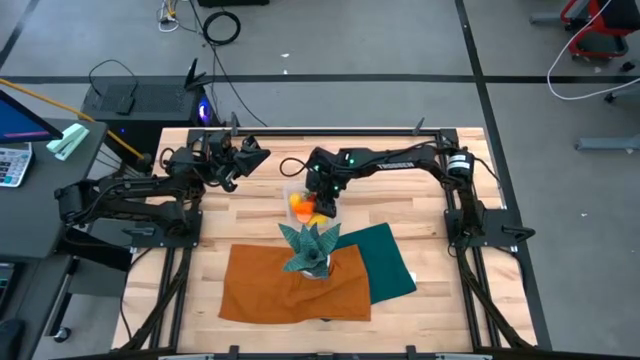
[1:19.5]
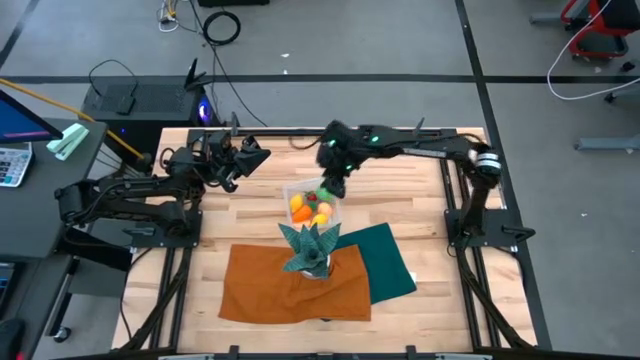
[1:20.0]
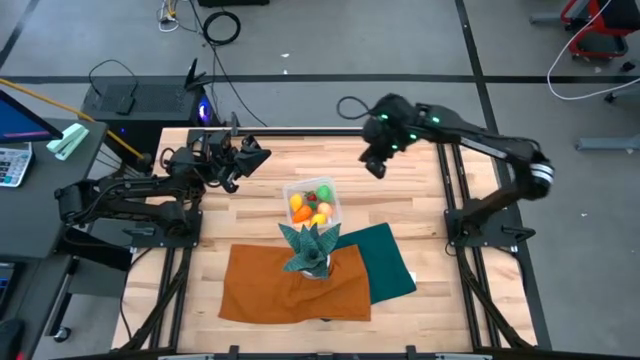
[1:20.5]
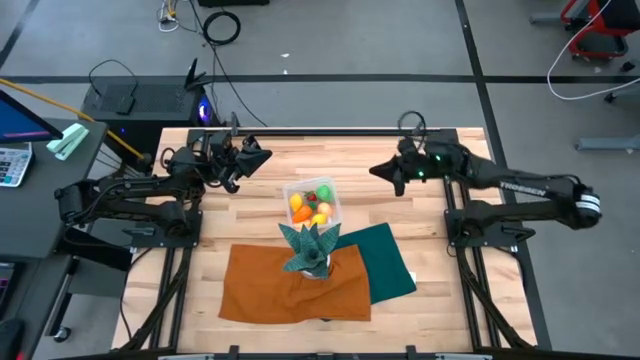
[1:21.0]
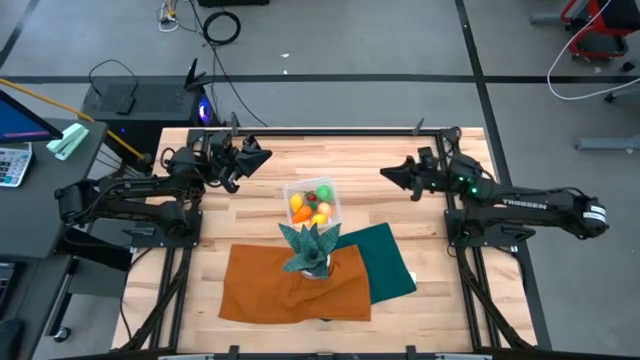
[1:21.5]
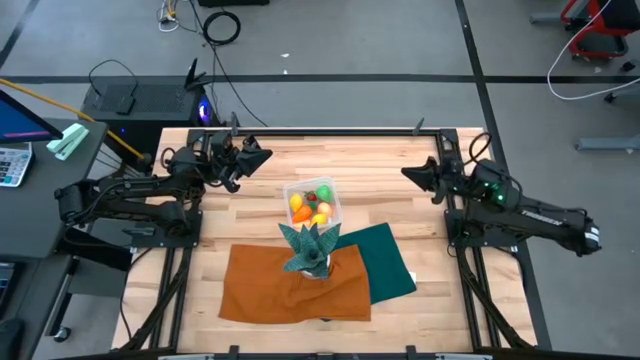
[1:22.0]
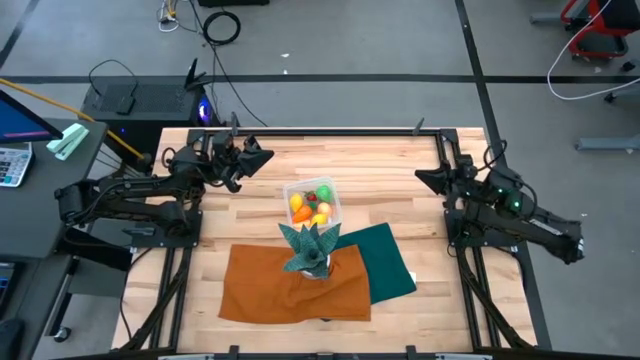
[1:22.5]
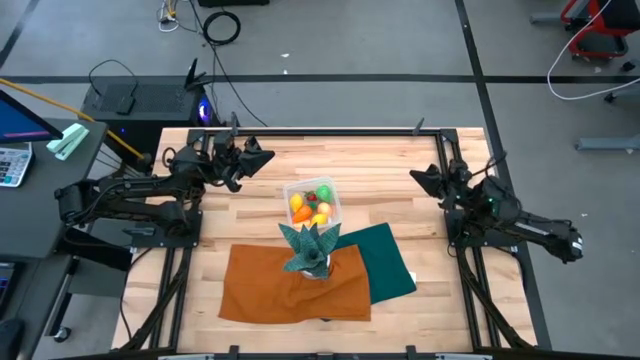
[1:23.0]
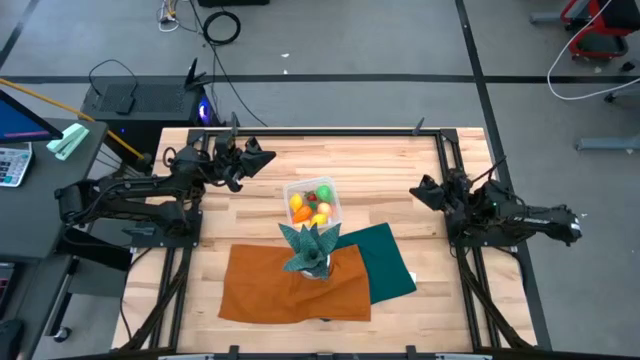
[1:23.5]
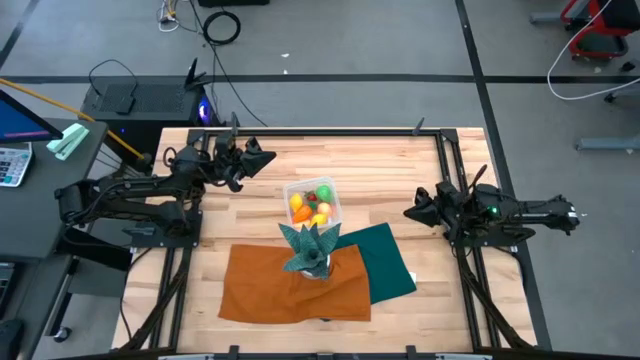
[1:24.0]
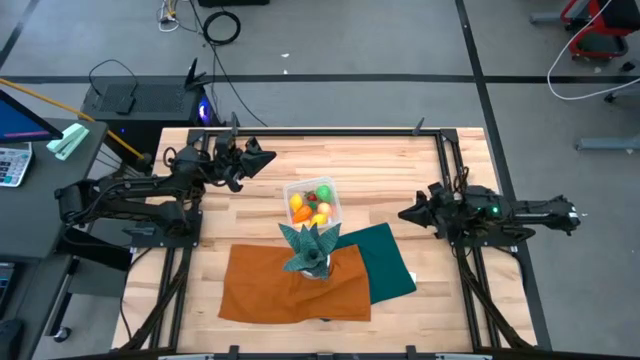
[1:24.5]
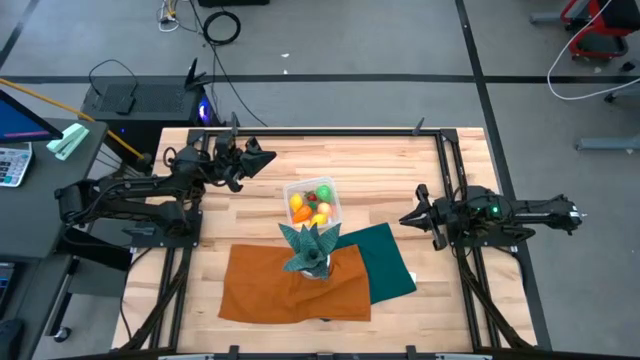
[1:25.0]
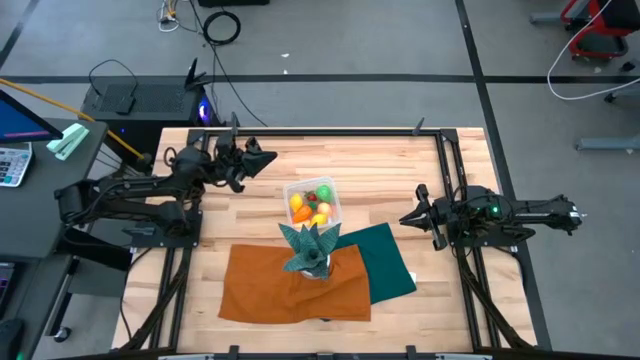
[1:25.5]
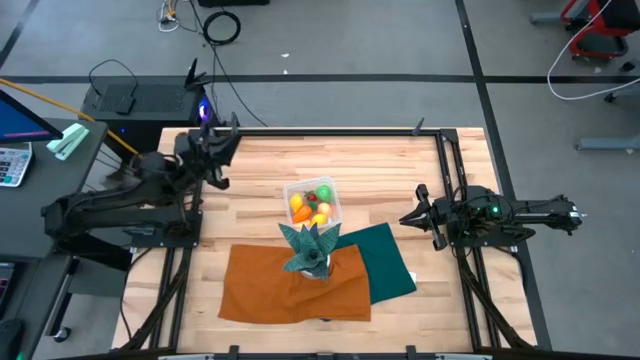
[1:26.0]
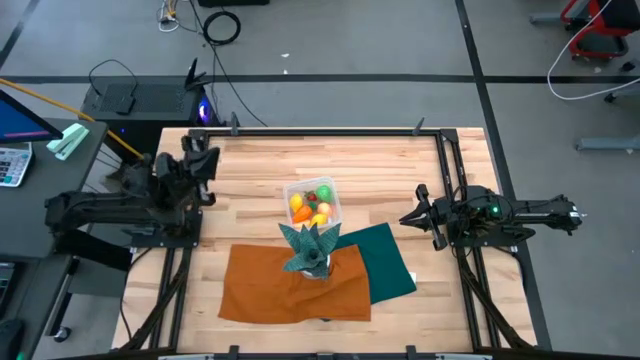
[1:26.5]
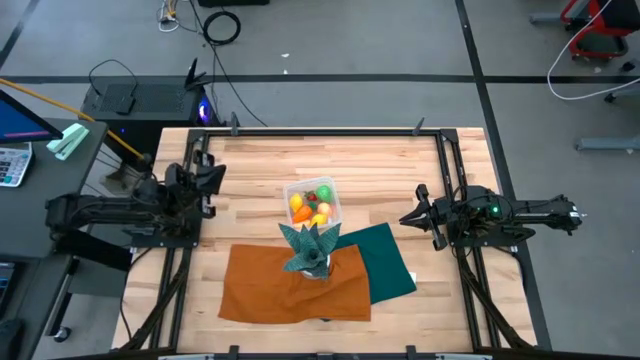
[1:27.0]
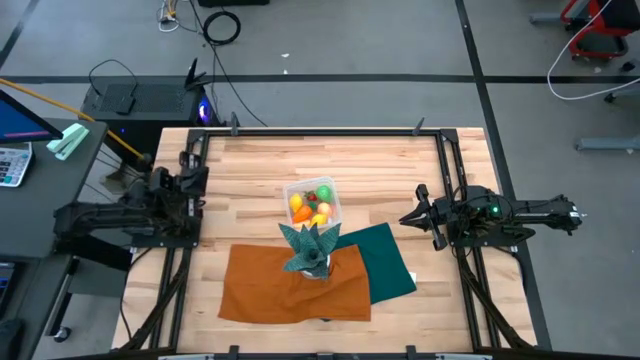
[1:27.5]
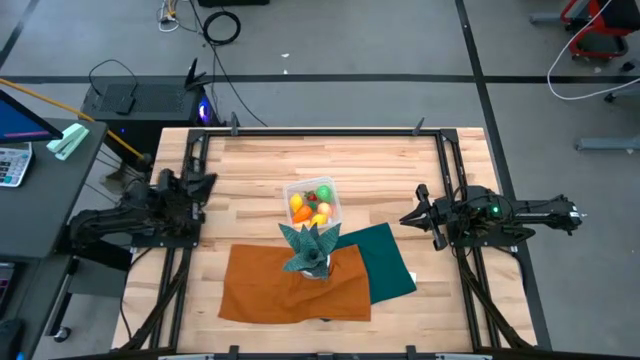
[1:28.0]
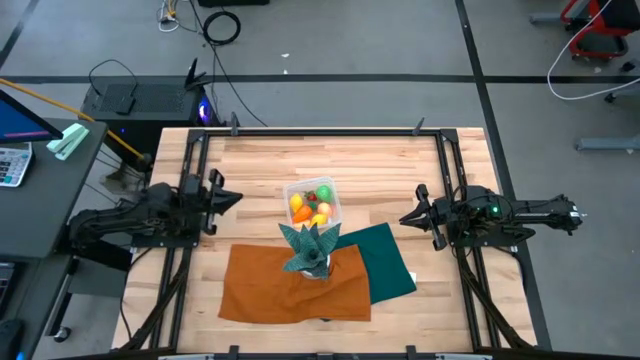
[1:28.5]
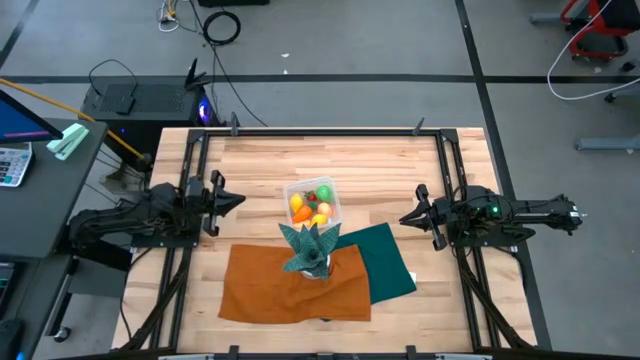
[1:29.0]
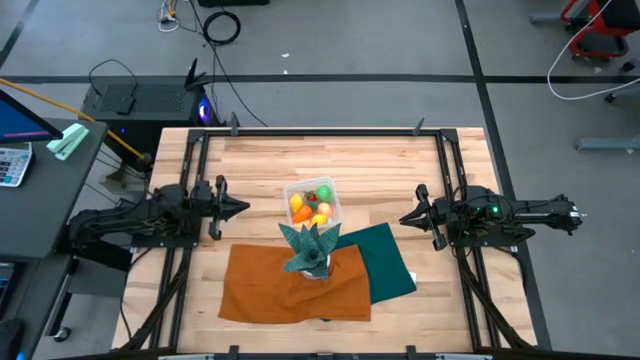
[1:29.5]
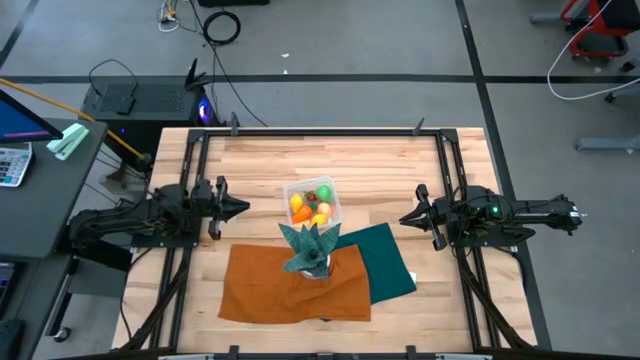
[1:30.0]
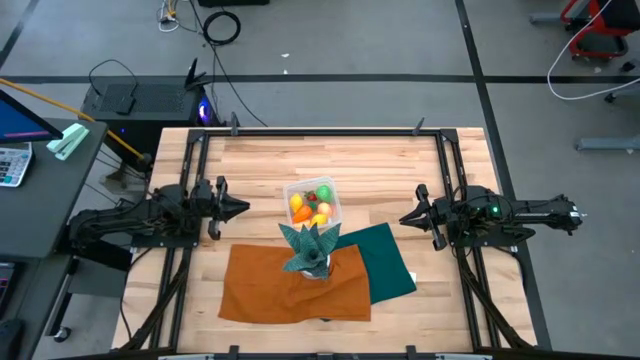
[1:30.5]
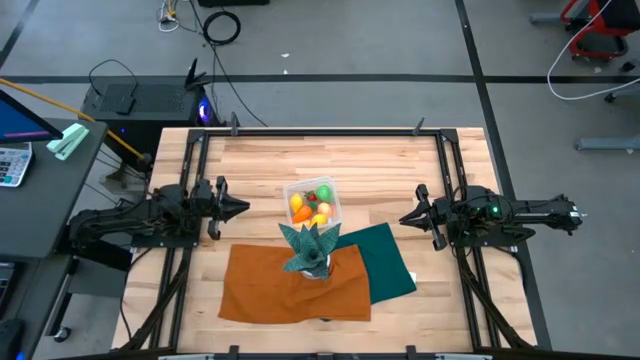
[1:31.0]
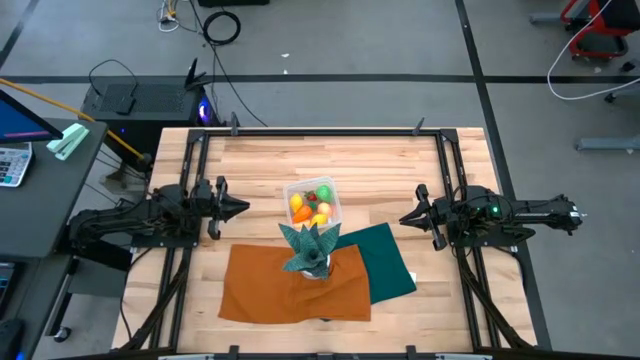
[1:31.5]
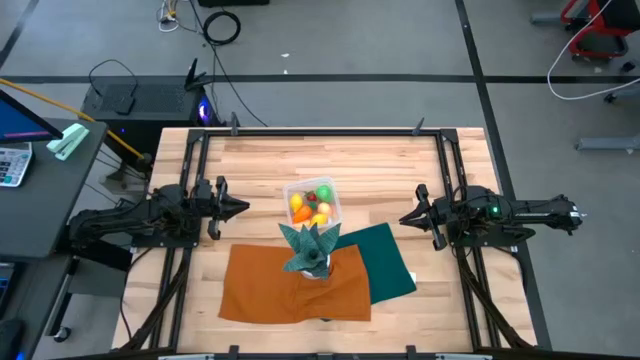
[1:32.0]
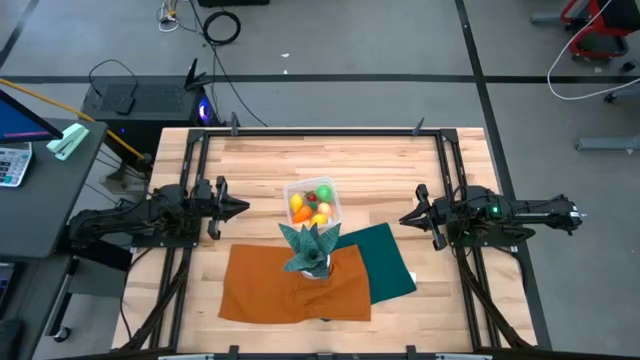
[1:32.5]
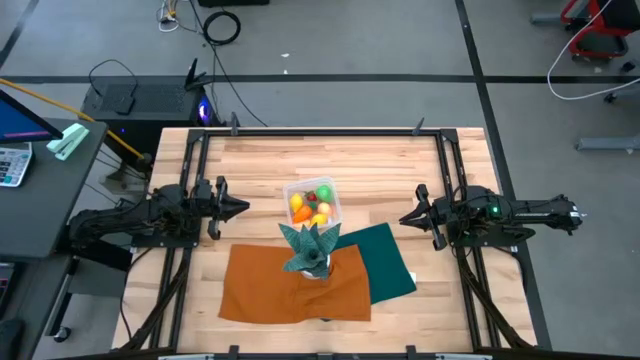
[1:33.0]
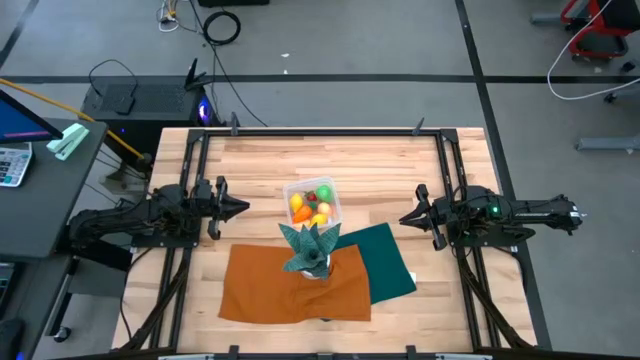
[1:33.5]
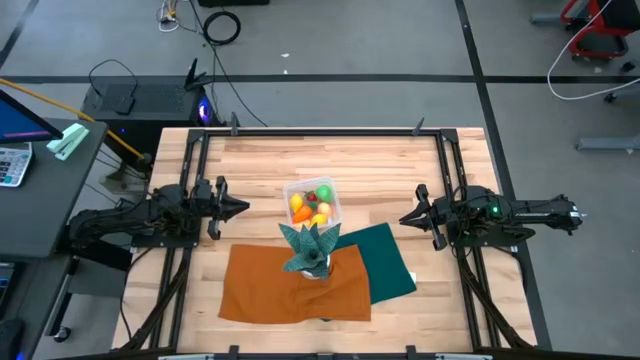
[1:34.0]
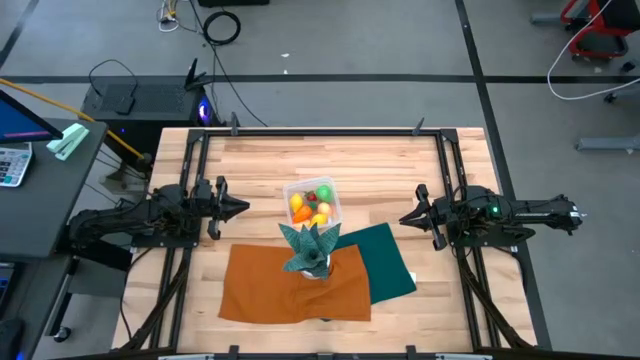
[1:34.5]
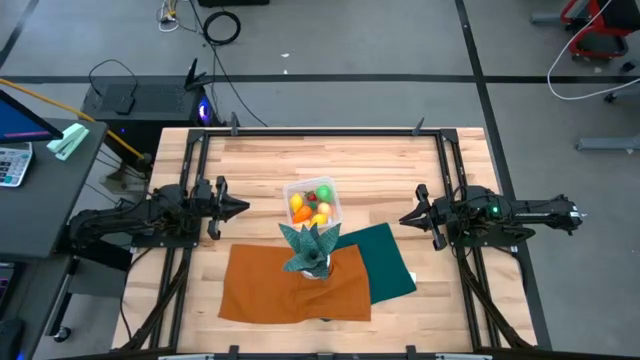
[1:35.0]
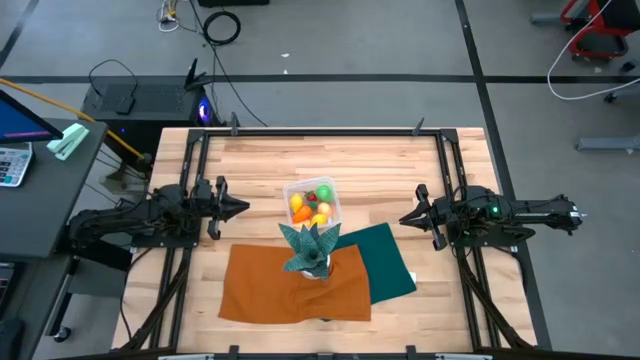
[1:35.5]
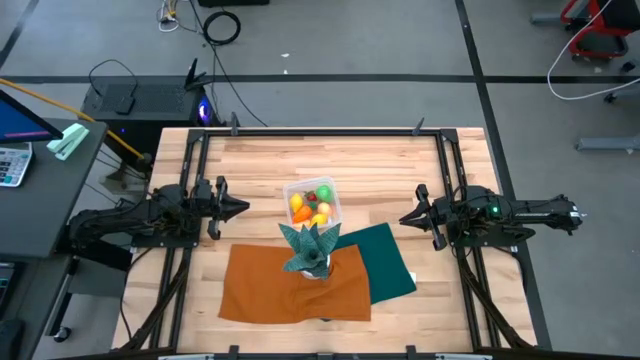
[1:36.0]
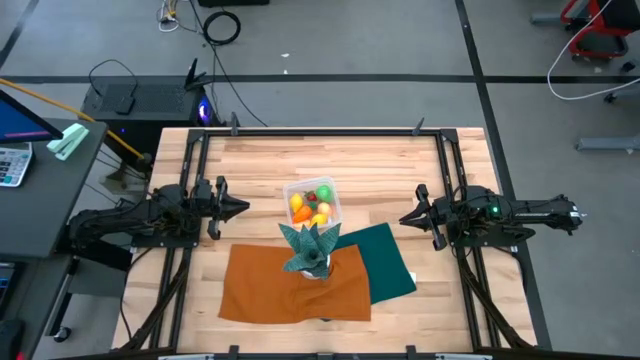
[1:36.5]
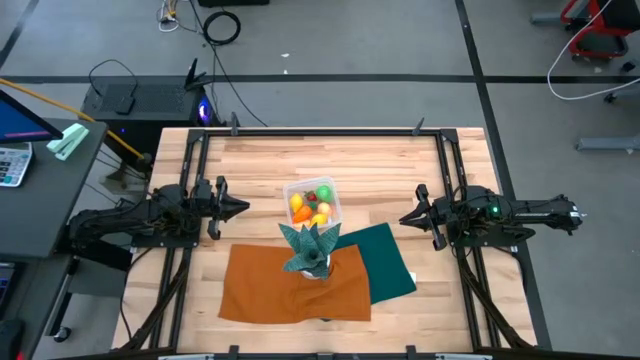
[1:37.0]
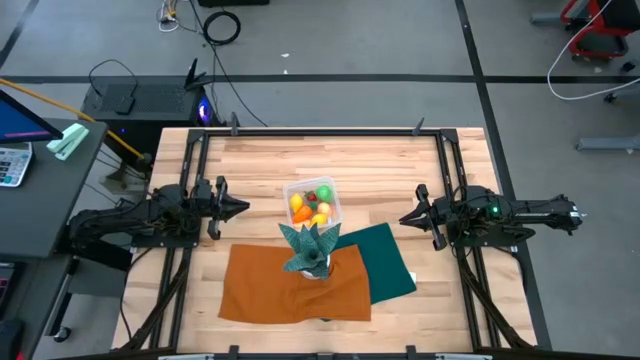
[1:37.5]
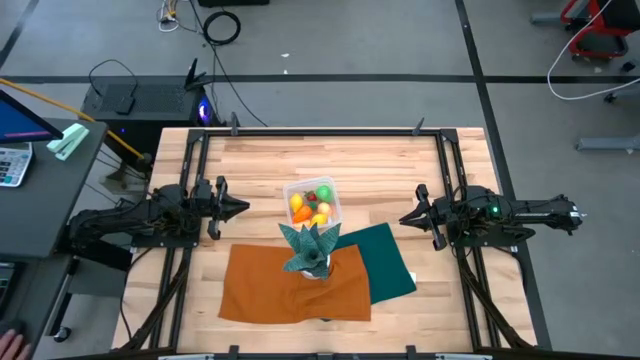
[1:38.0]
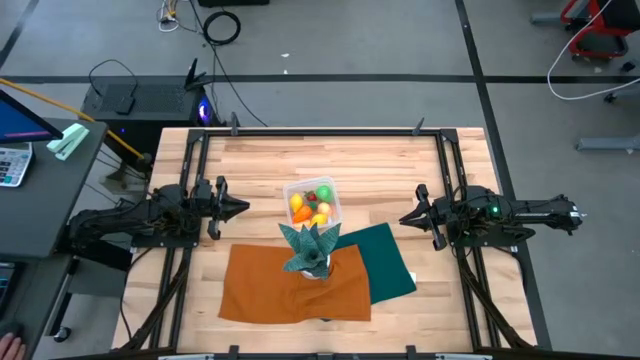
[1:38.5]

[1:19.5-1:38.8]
Task: Pick and placing Produce into tupperware
Return to Home Position

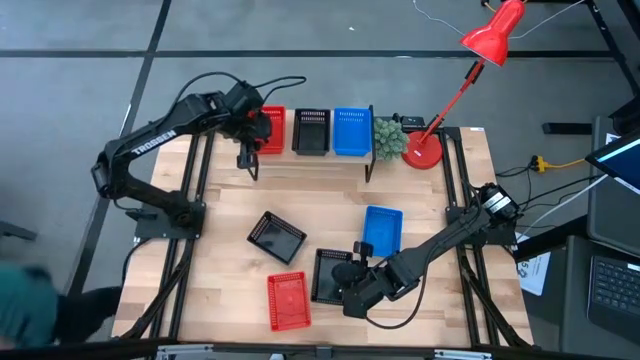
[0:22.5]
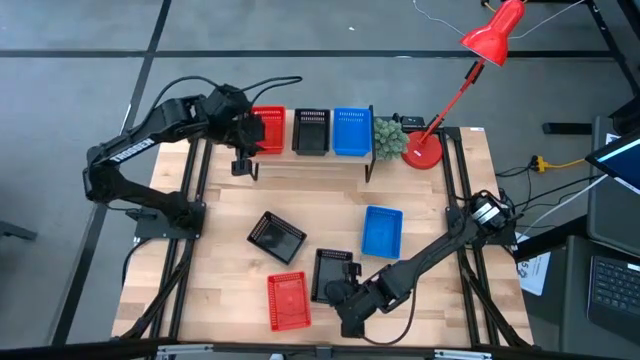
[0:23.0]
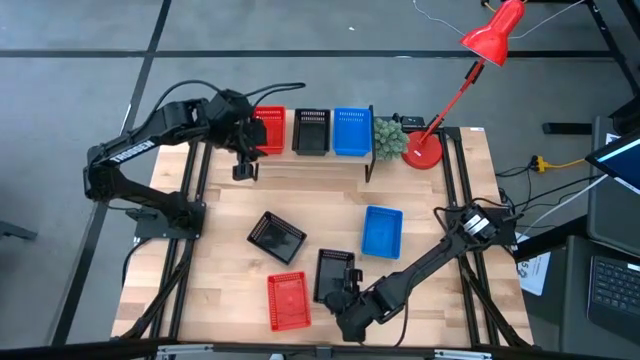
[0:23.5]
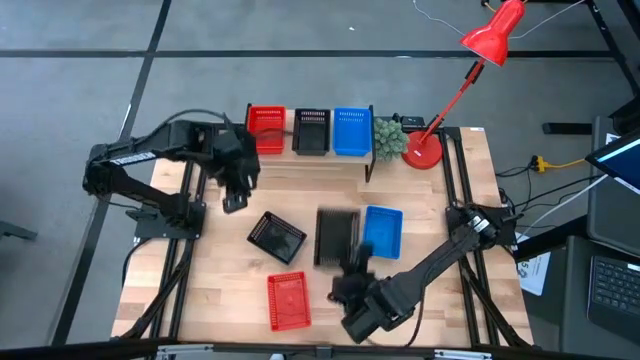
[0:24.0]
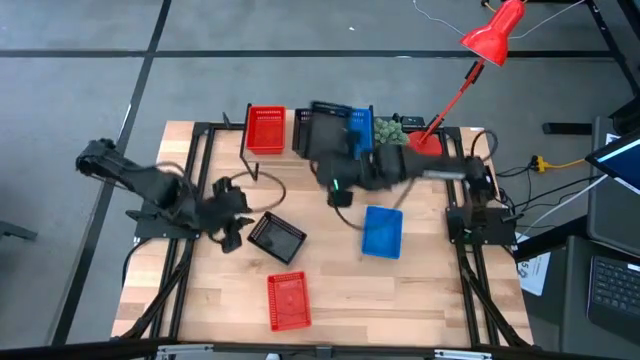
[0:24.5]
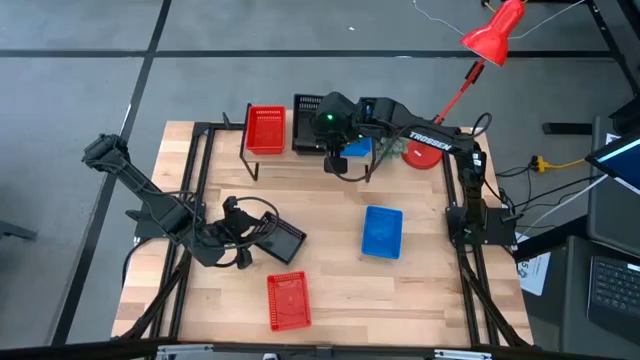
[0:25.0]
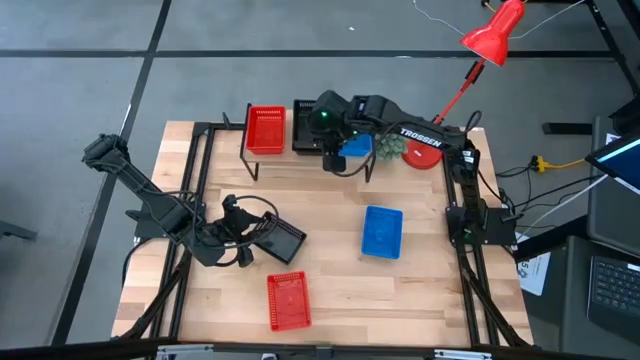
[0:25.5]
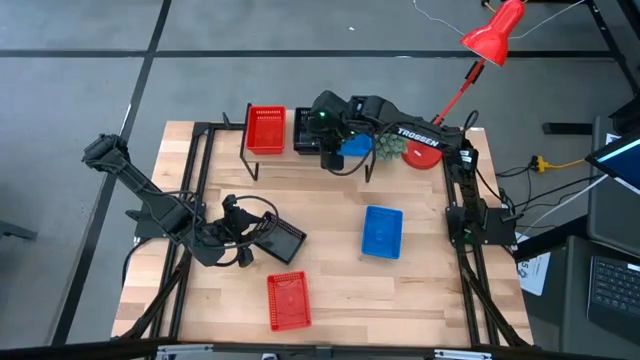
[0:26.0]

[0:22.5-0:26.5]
Task: Stack baskets on shelf by color
Stack the bottom black bin on top of the black bin on the shelf
